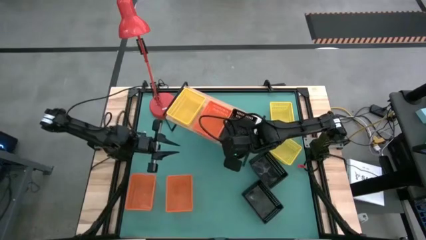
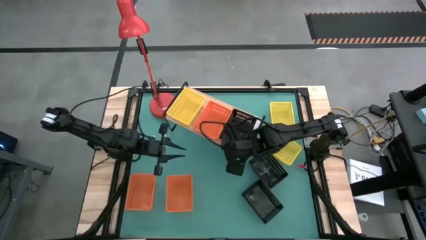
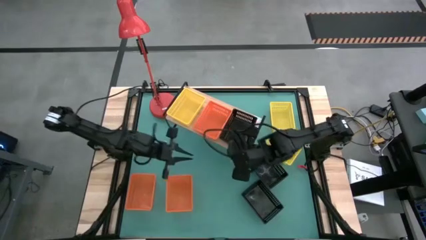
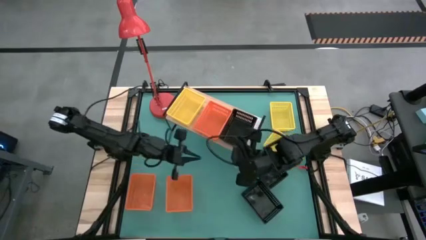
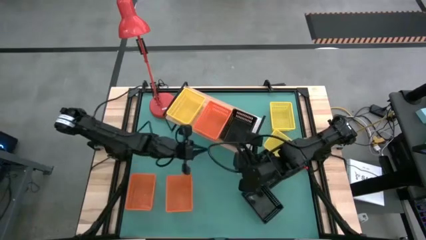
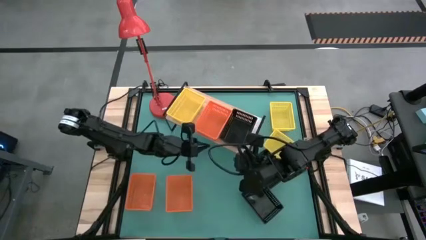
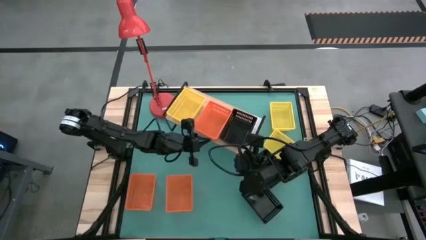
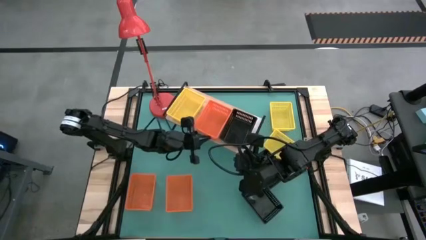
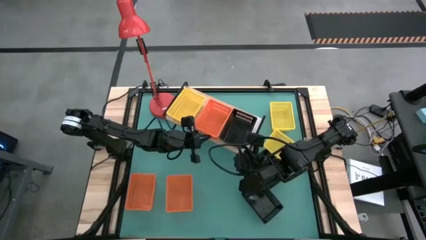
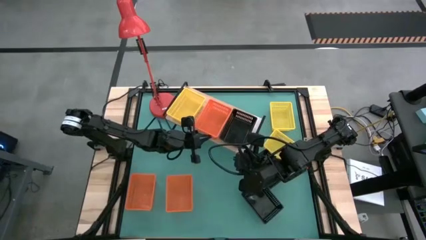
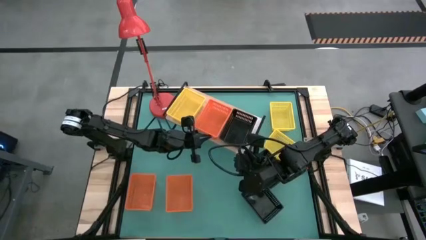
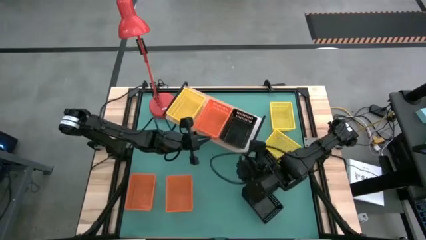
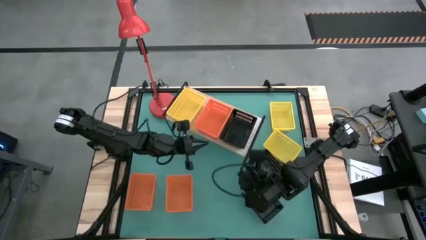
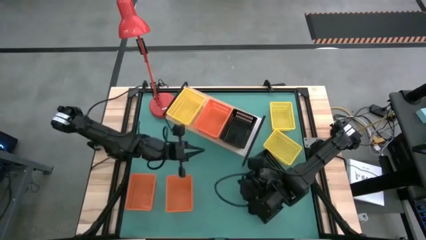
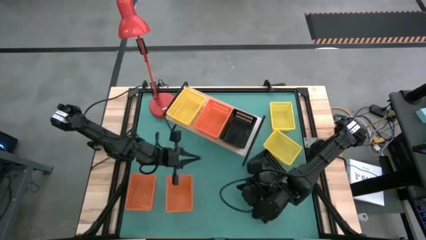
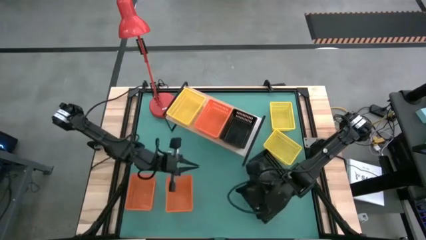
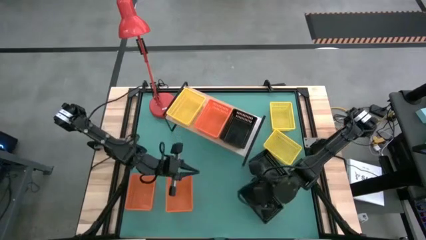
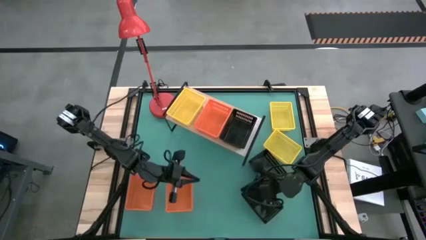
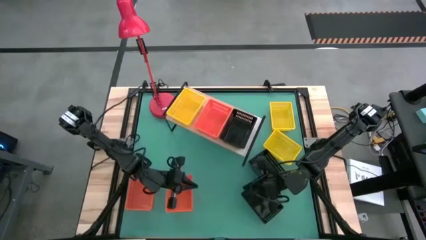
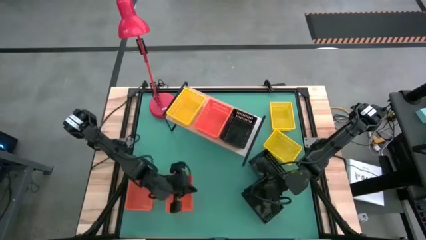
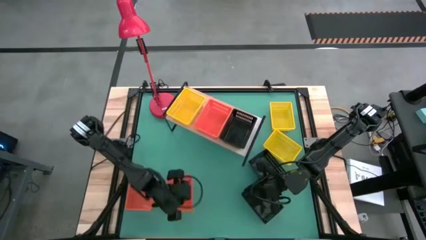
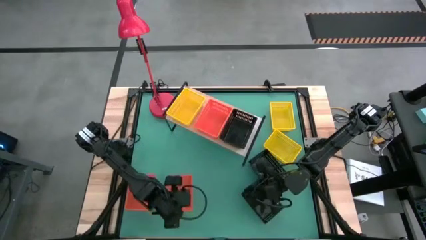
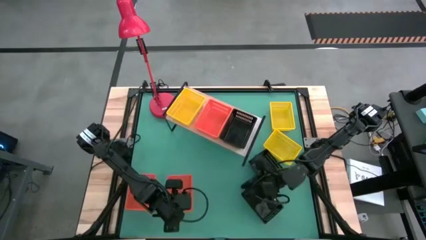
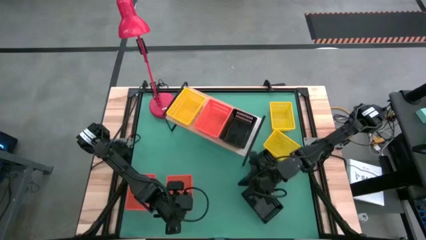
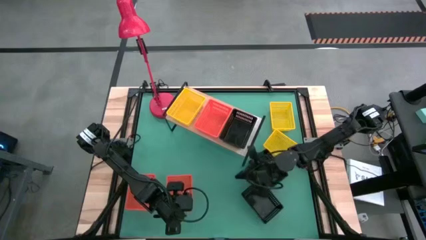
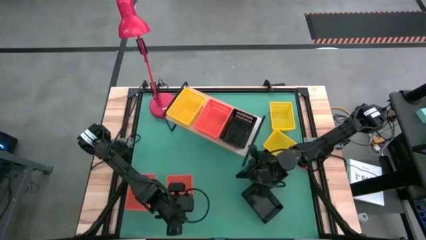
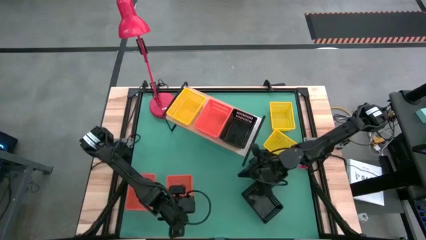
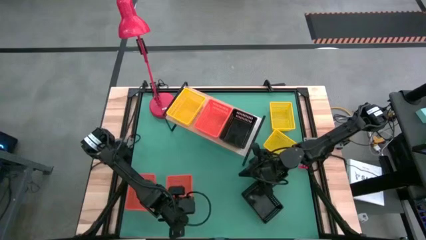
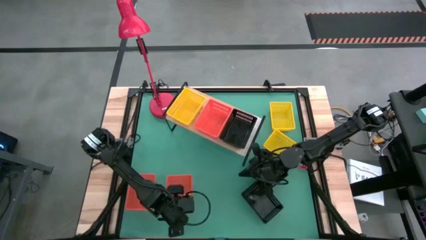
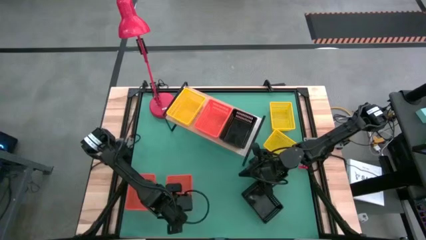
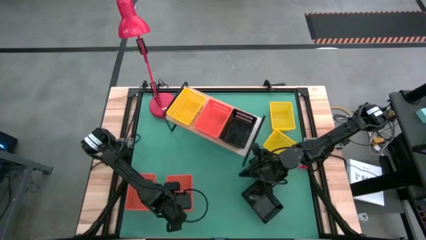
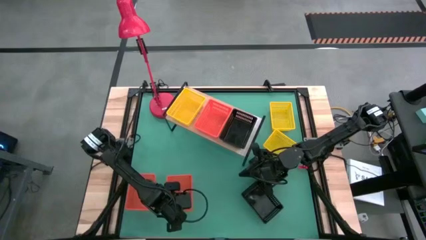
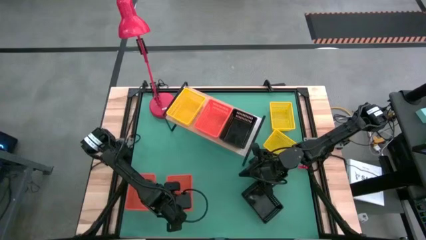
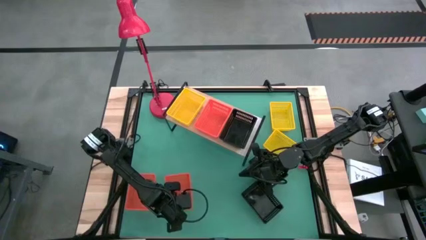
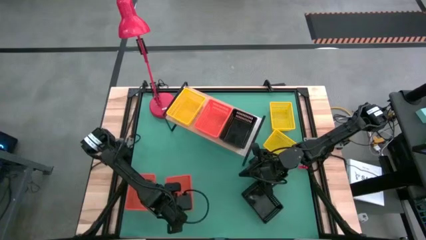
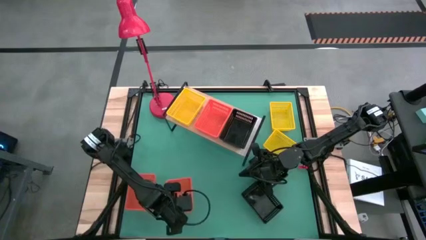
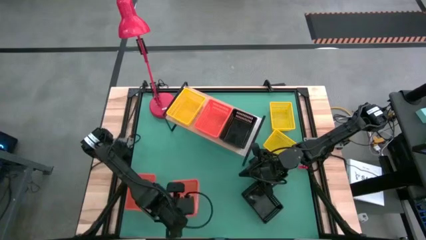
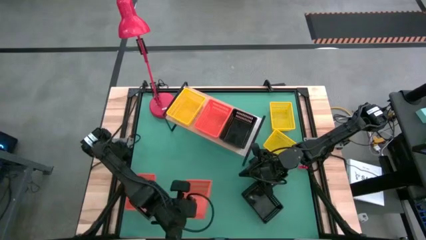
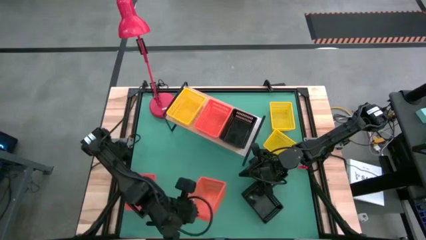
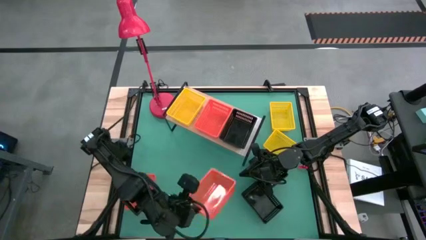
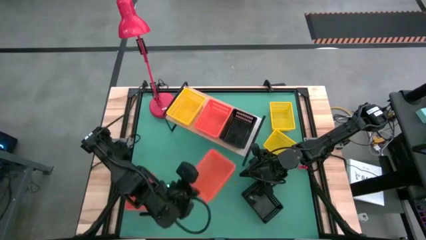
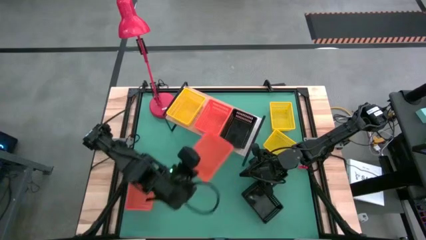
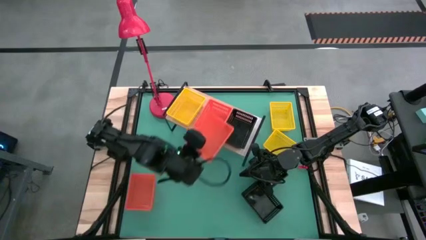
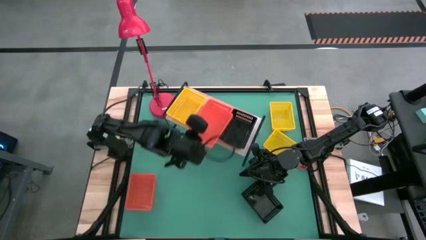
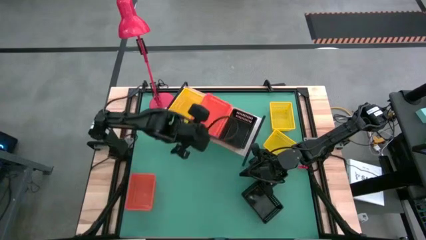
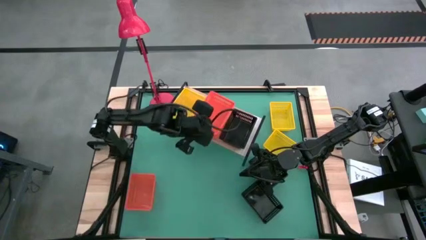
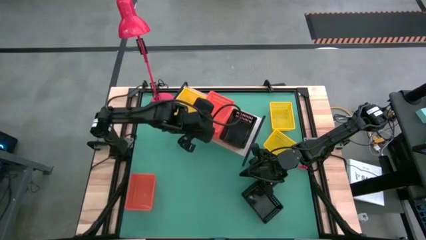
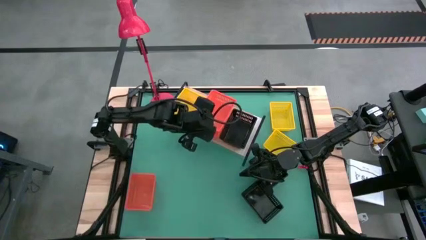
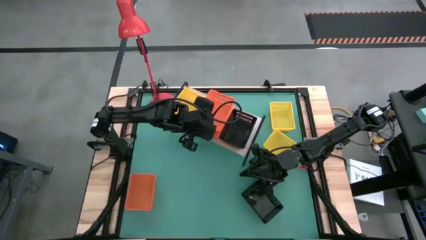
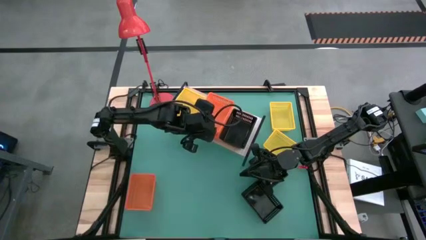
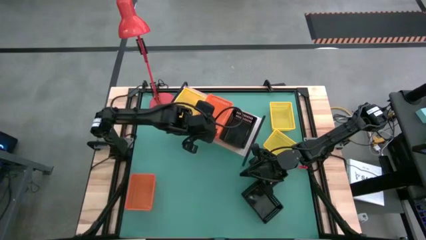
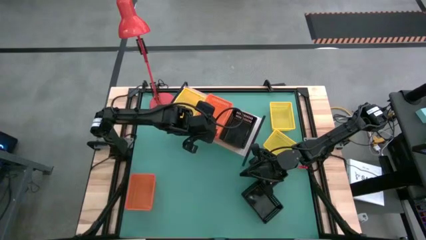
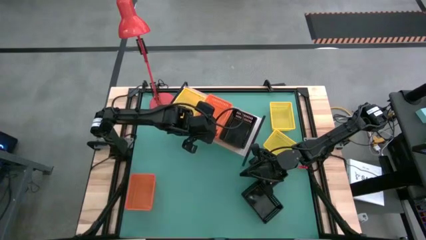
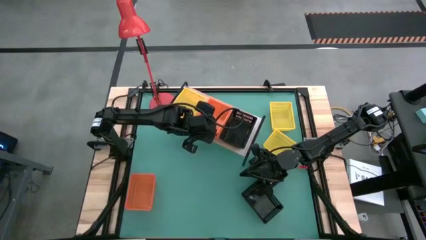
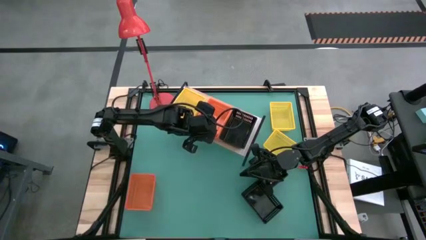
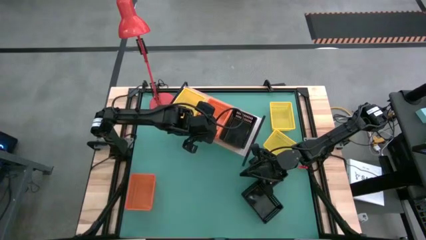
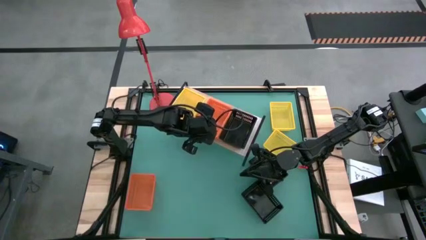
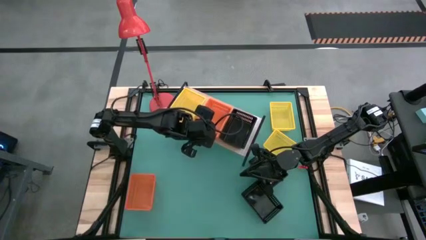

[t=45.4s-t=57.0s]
Task: Stack baskets on shelf by color
Stack the right orange bin on top of the other orange bin on the shelf

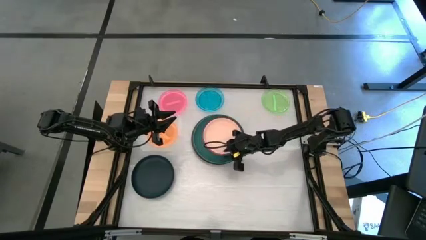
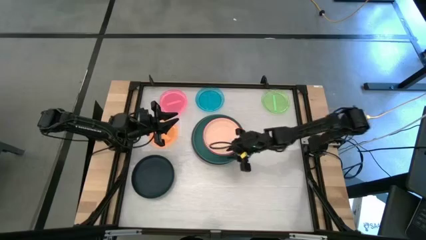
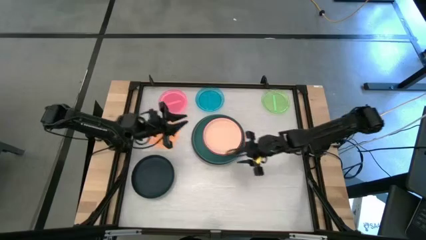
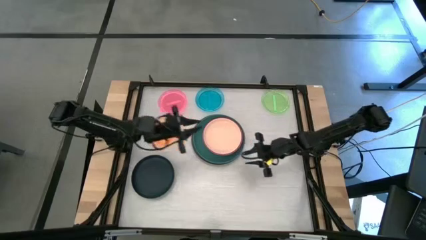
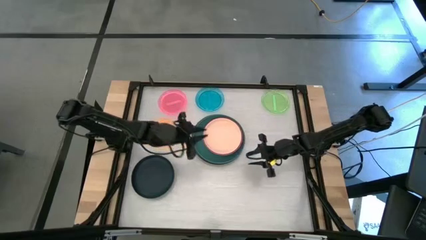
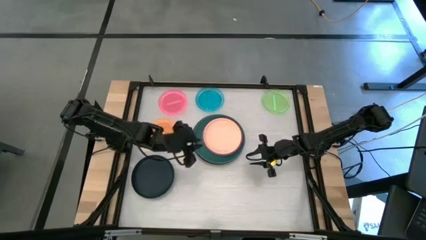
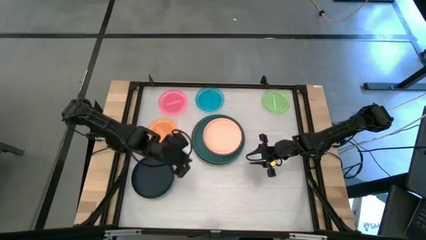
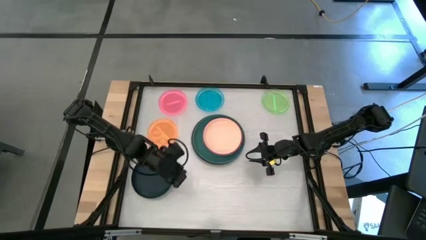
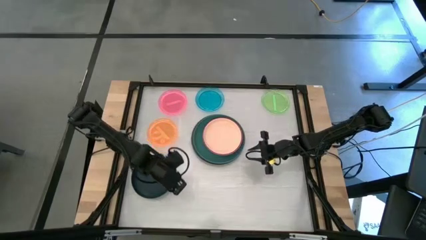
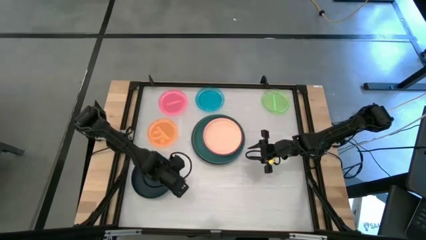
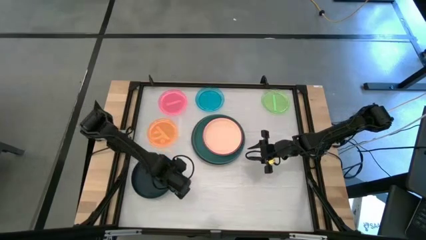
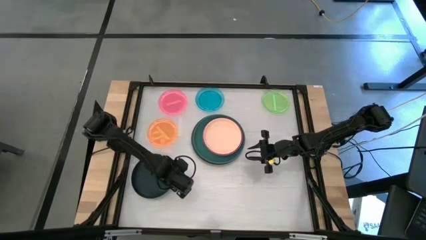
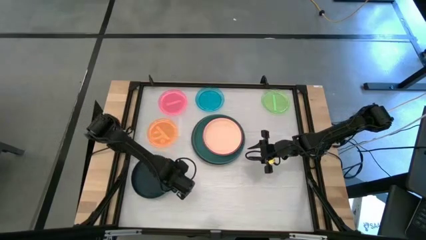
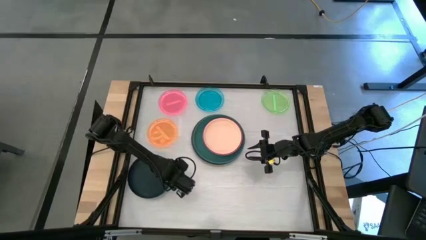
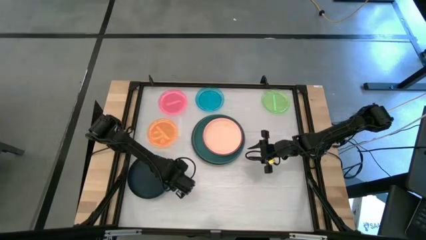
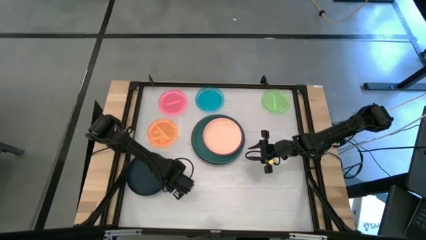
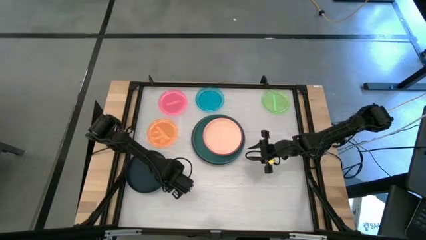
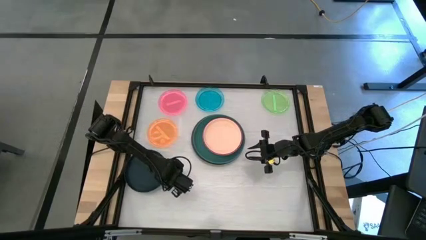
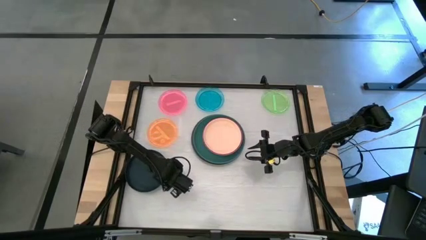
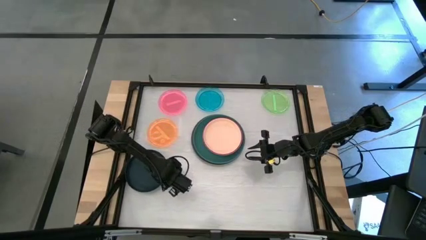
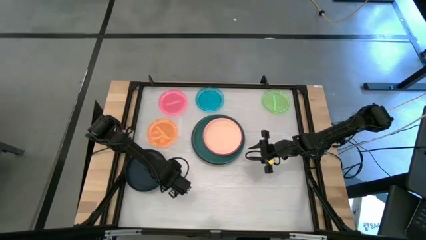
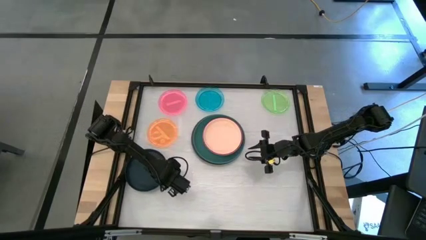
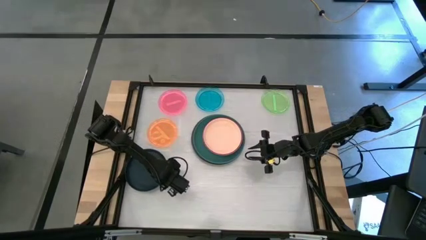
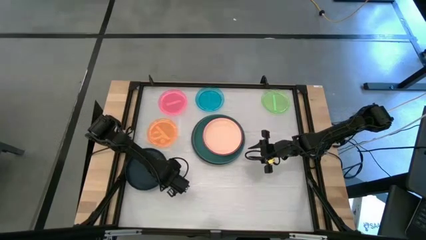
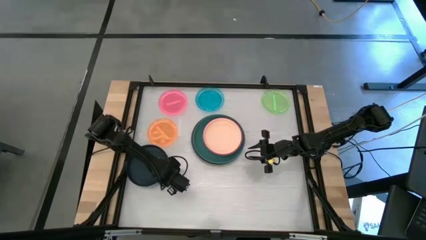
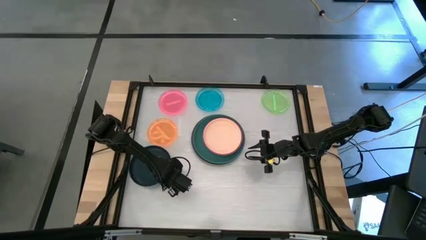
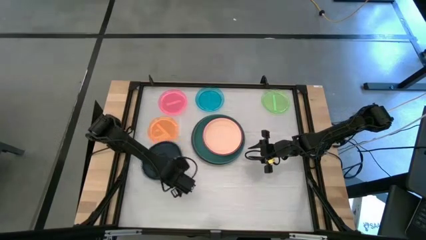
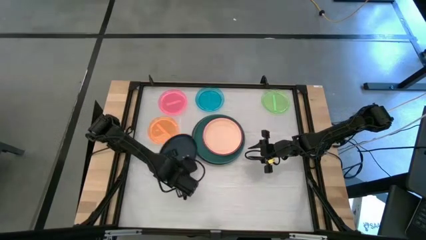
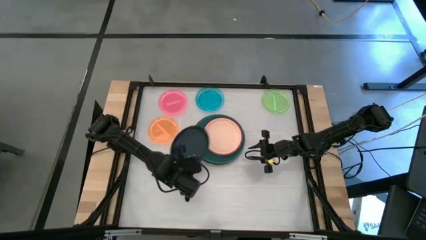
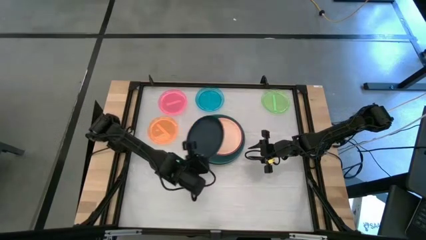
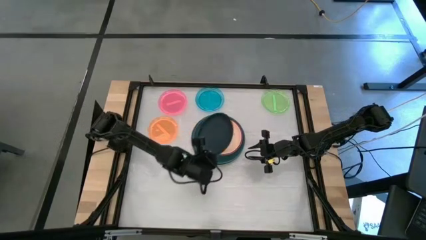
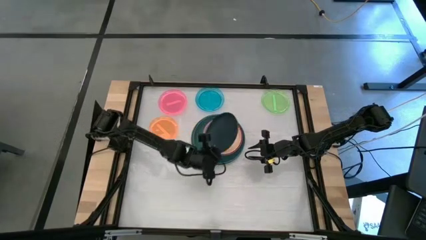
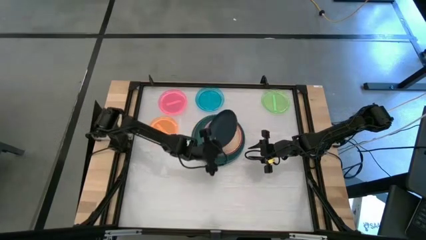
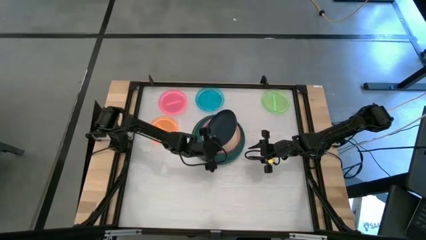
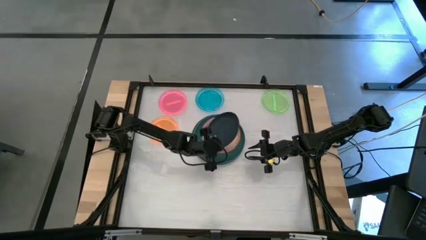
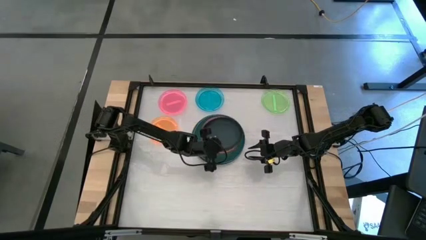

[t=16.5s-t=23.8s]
Task: Stack plastic plates
Stack the black plate on top of the light orange plate
